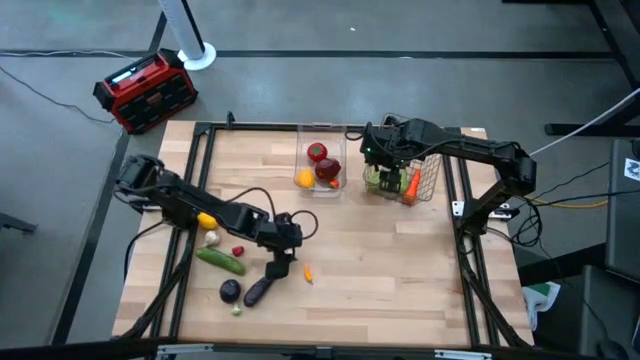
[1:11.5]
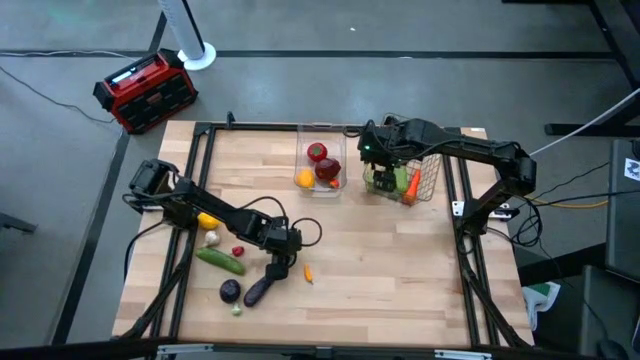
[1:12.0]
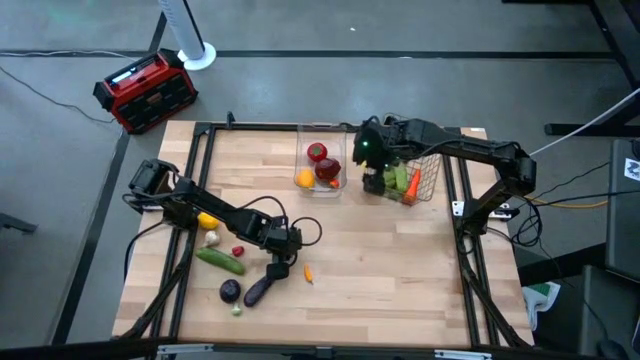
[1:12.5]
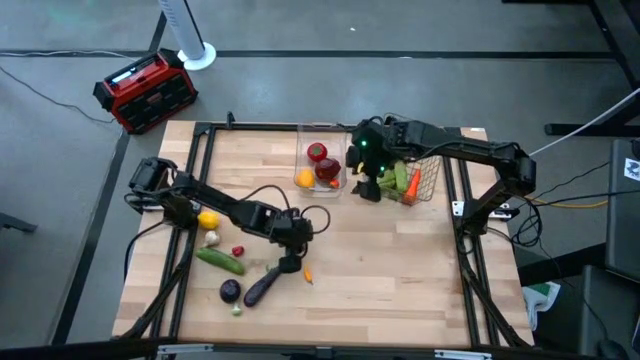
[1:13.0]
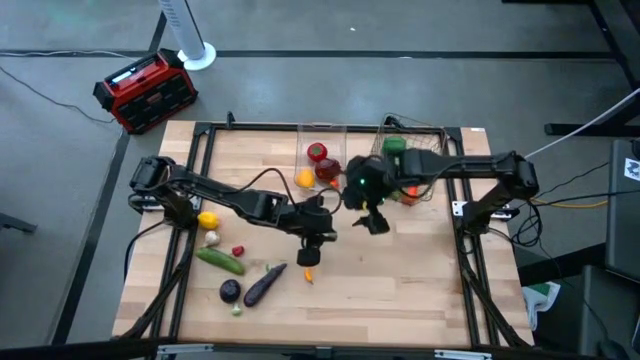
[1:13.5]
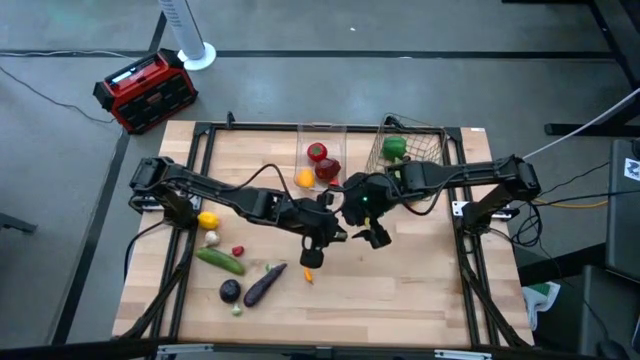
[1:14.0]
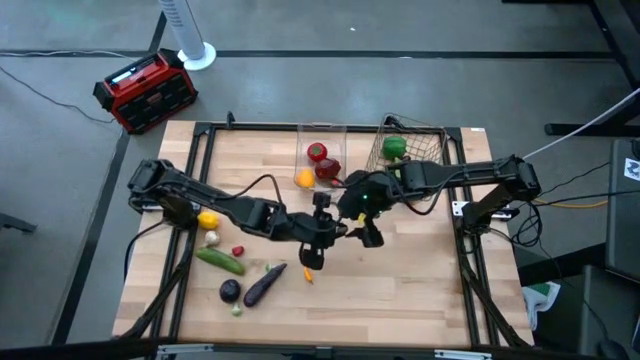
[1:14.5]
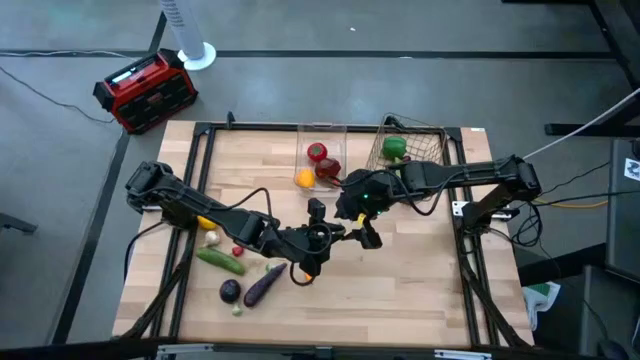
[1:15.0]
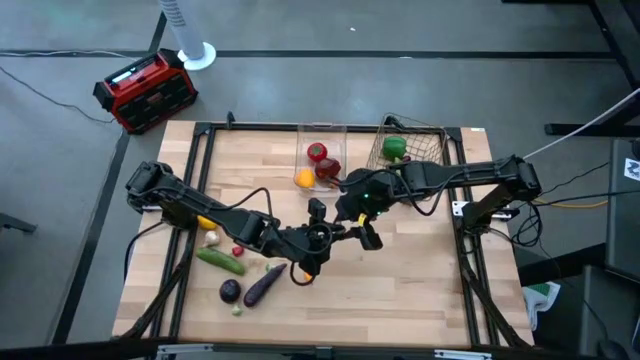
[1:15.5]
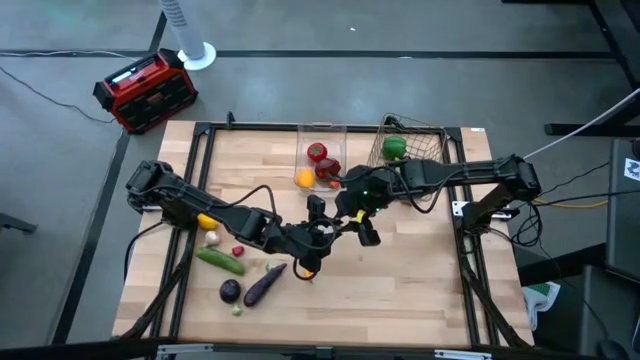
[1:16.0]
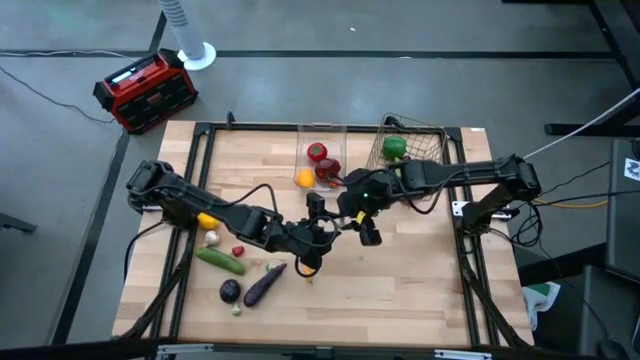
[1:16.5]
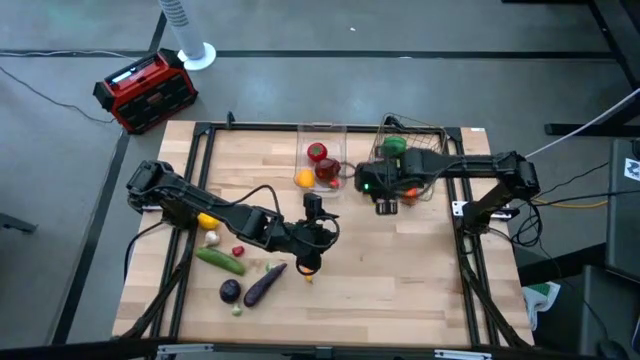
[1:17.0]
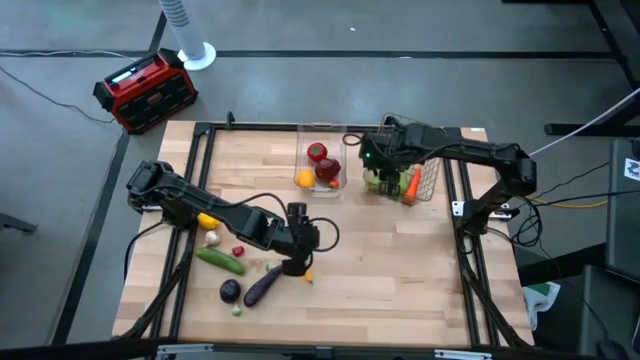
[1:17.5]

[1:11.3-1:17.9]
Task: Sort produce into baskets
Put the green mushroom into the wire basket

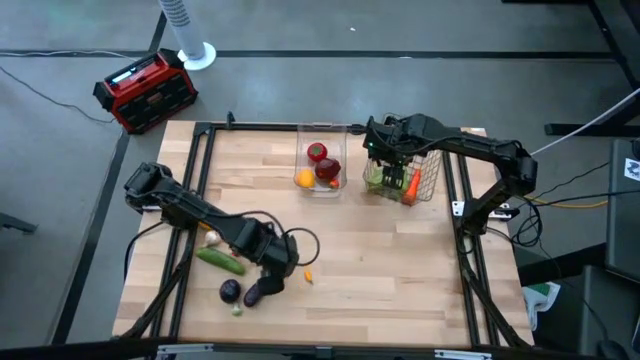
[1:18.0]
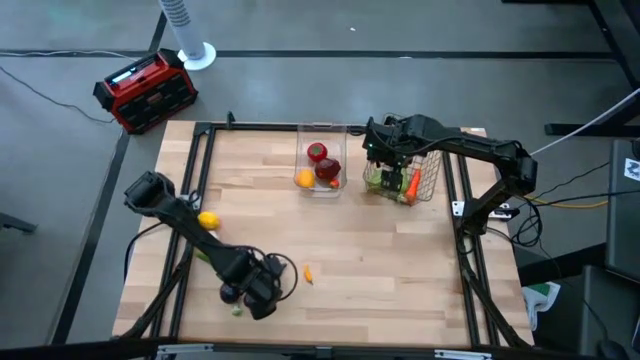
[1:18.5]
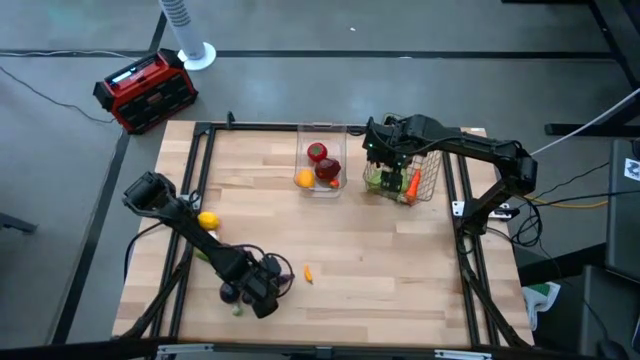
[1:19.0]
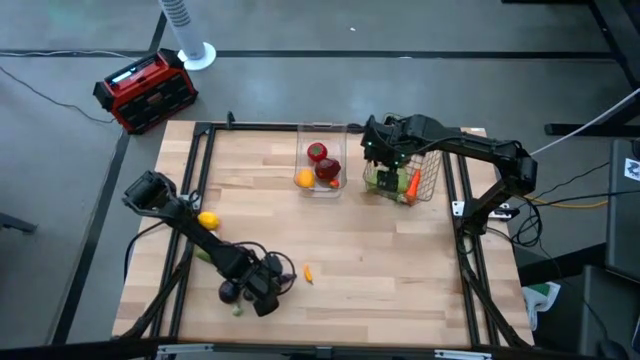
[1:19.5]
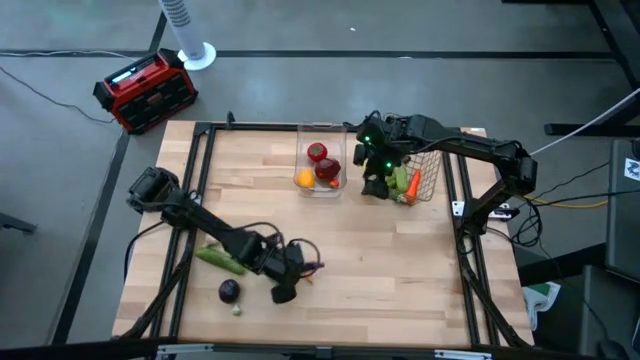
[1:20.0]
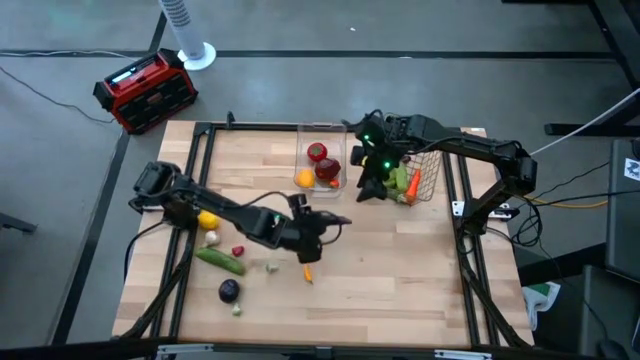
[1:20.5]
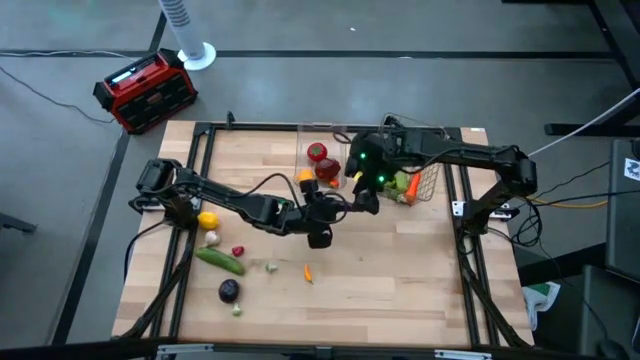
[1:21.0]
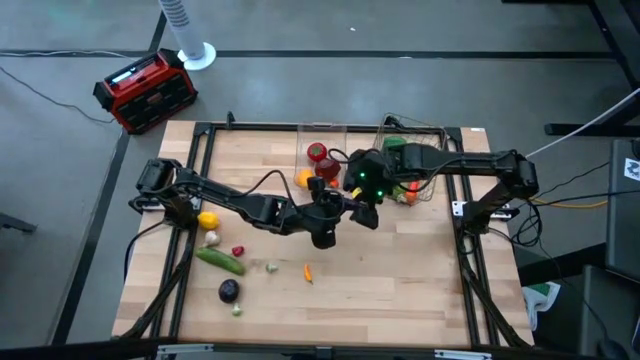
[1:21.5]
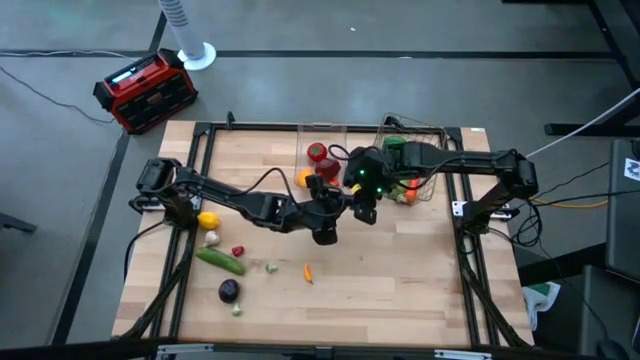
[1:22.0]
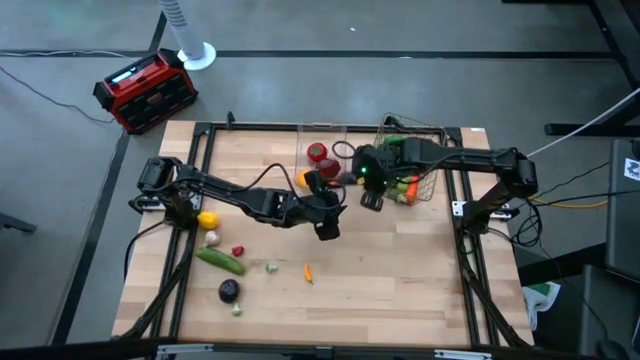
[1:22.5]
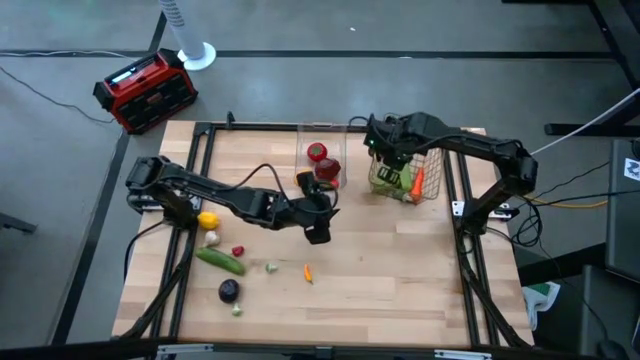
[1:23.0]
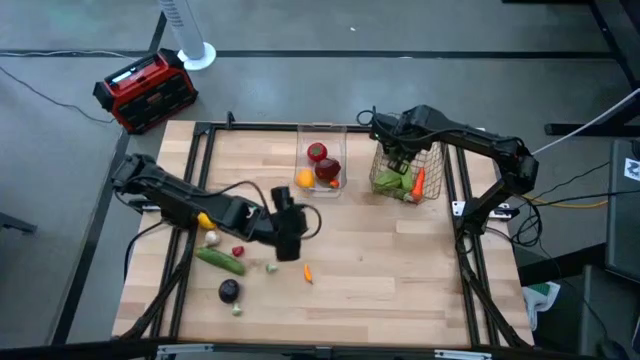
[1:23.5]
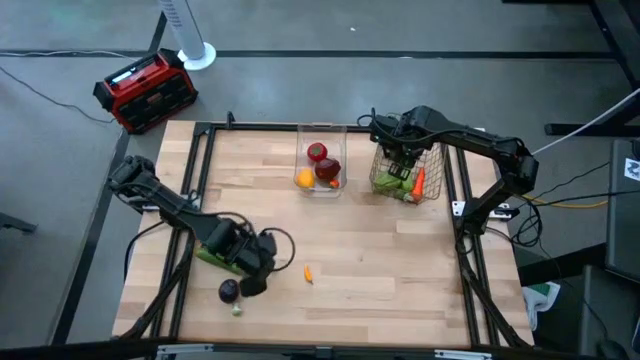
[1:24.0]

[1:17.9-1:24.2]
Put the violet eggplant into the wire basket

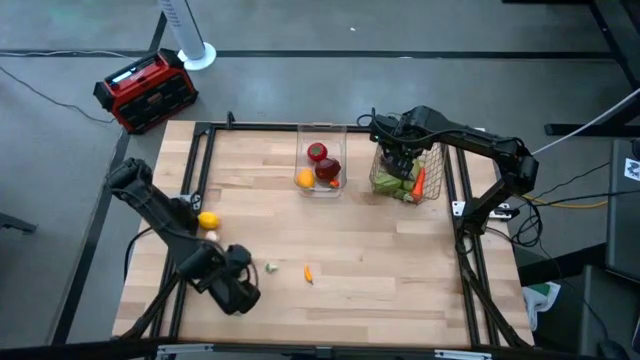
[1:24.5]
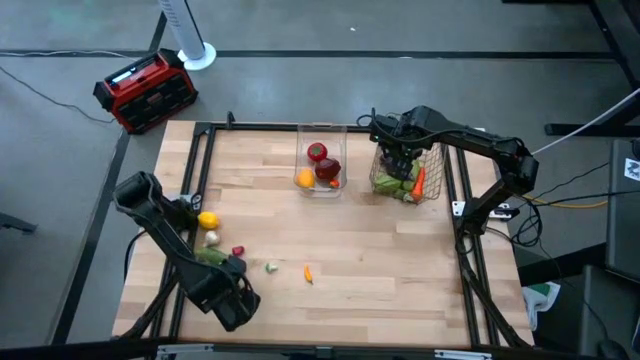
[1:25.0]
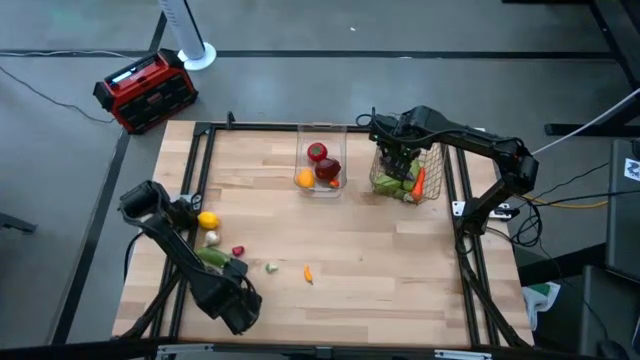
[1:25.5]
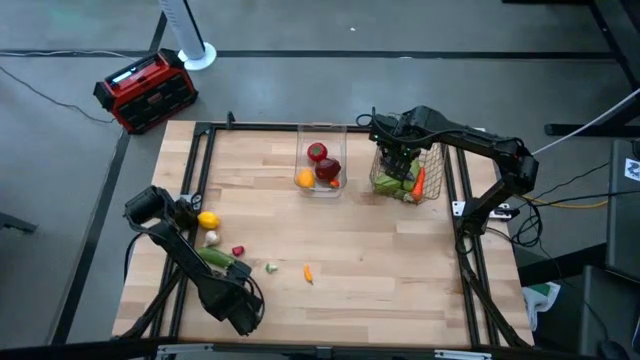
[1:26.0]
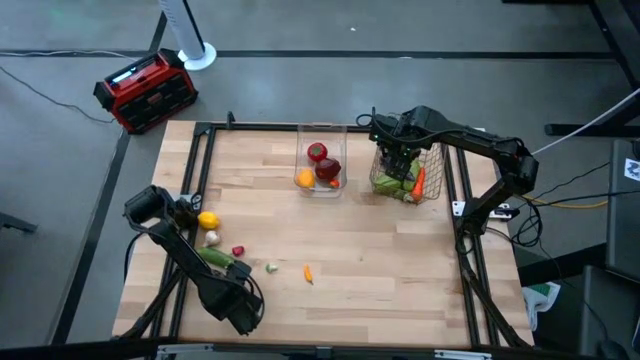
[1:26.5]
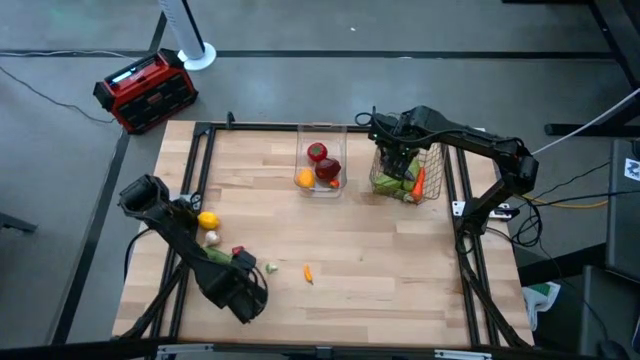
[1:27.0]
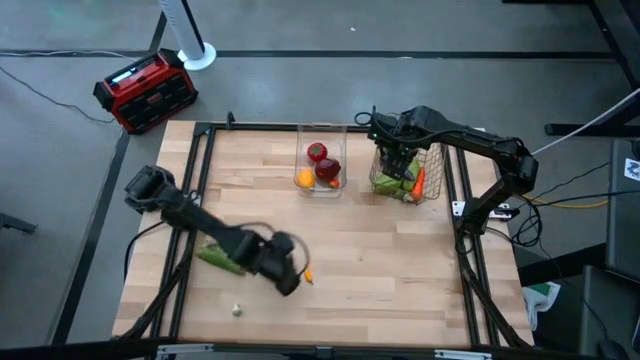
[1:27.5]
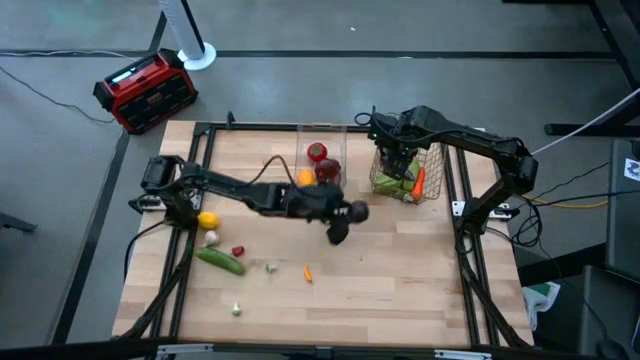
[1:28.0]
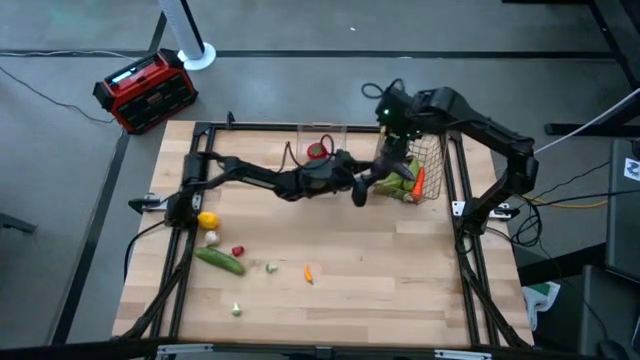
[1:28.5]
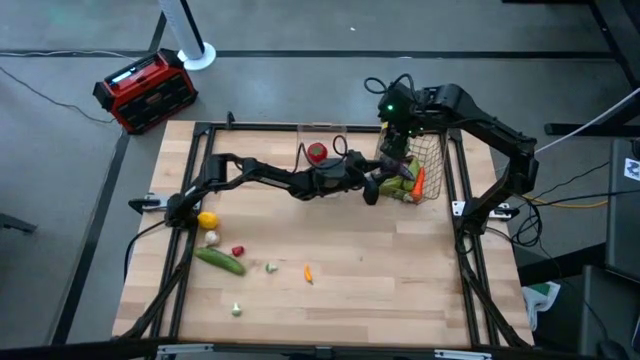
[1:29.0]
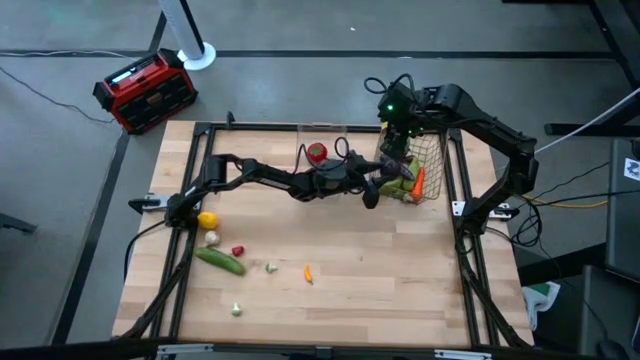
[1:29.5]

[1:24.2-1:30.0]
Put the violet eggplant into the wire basket
